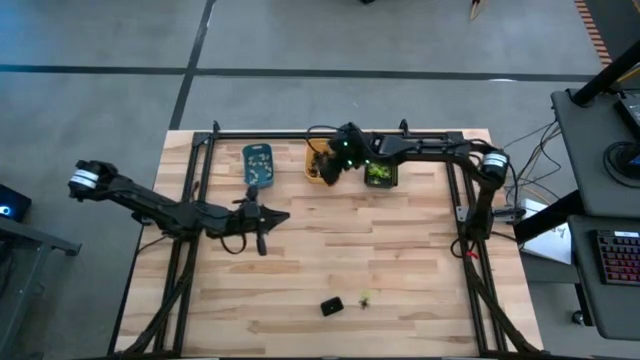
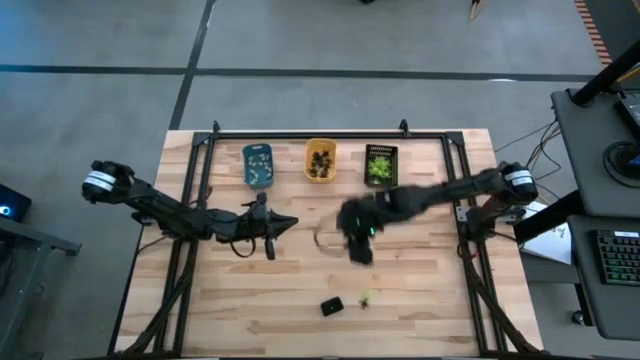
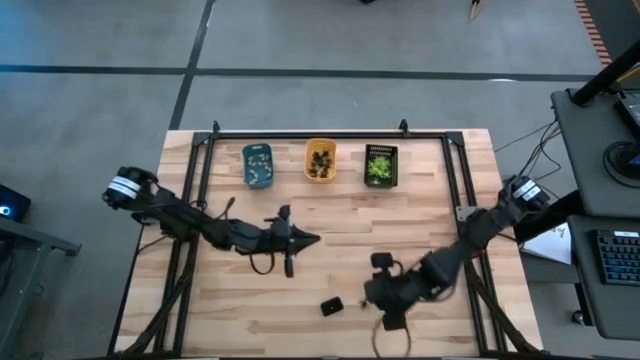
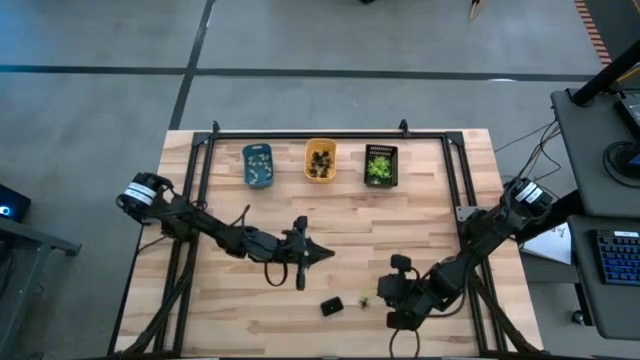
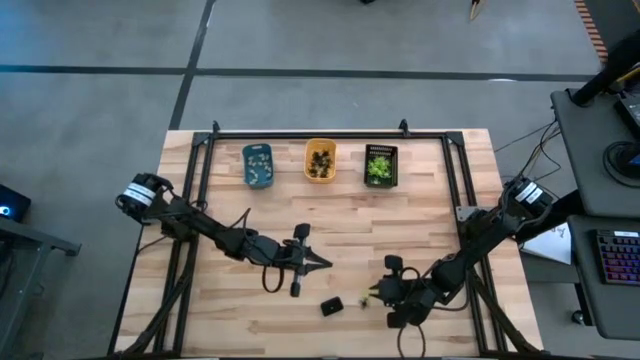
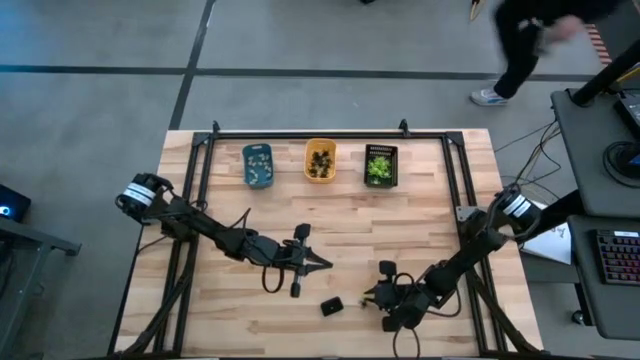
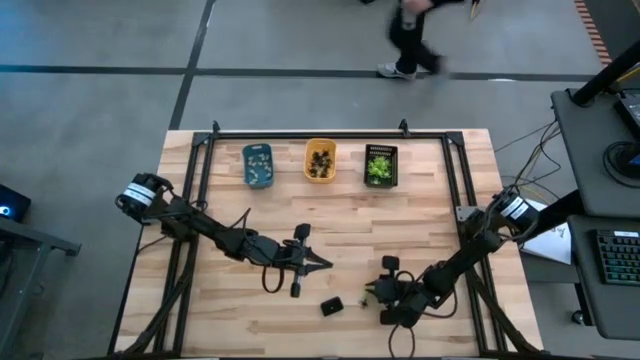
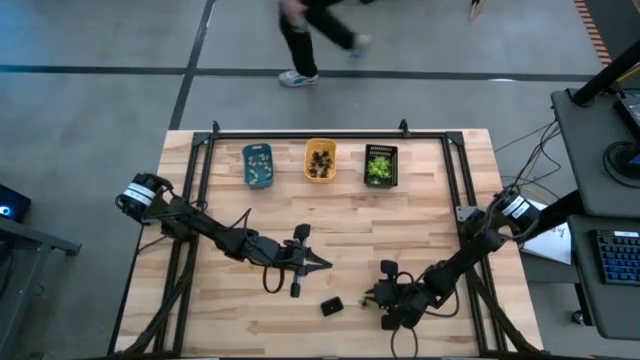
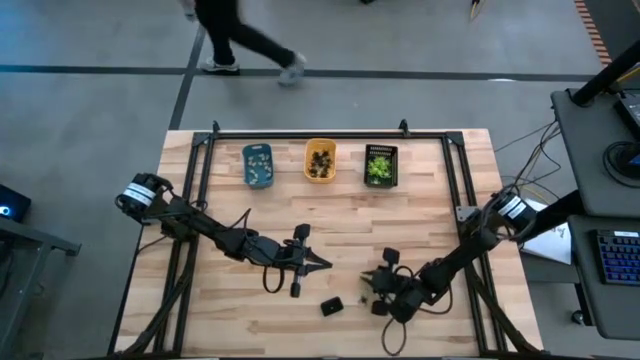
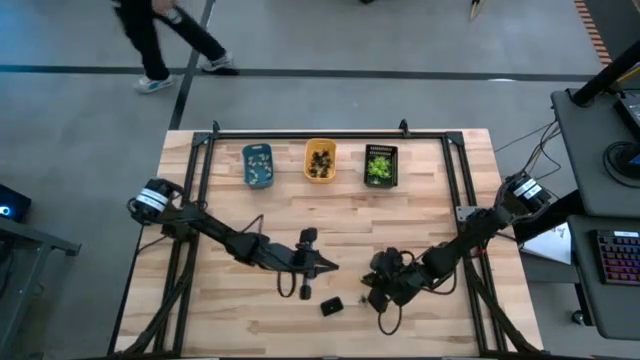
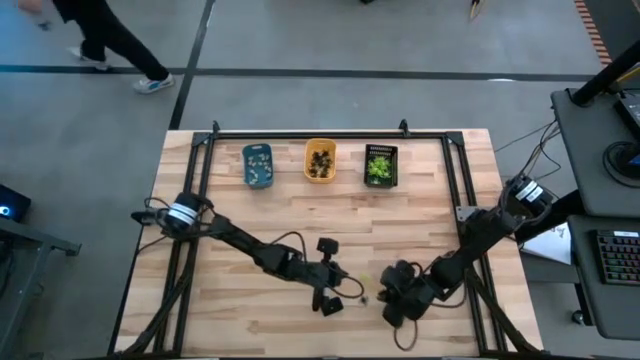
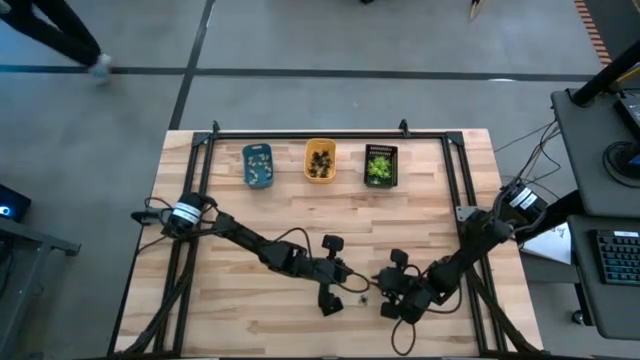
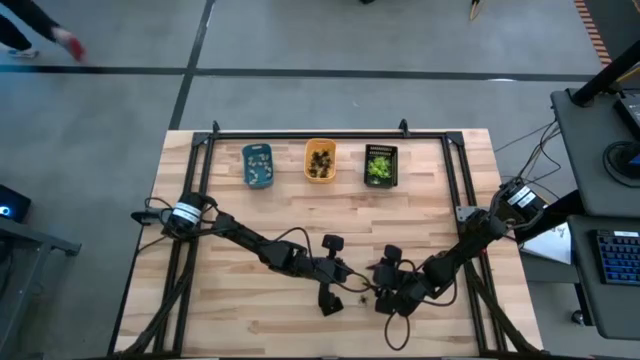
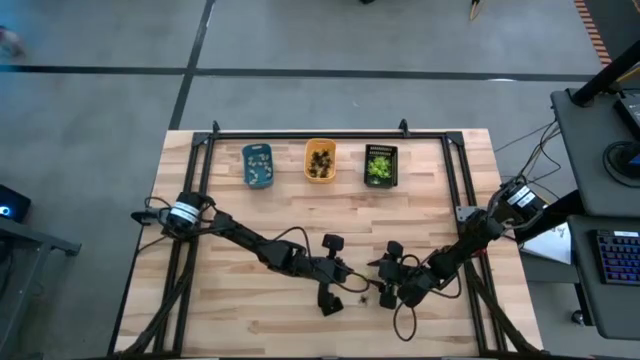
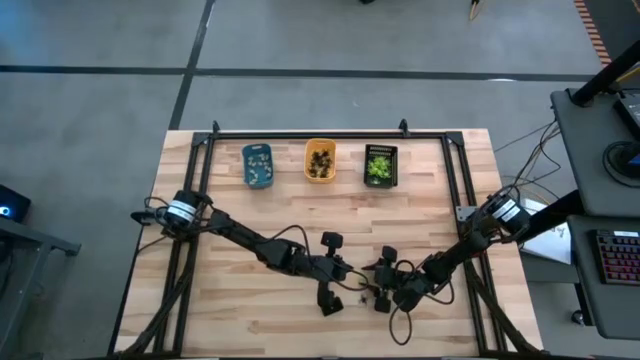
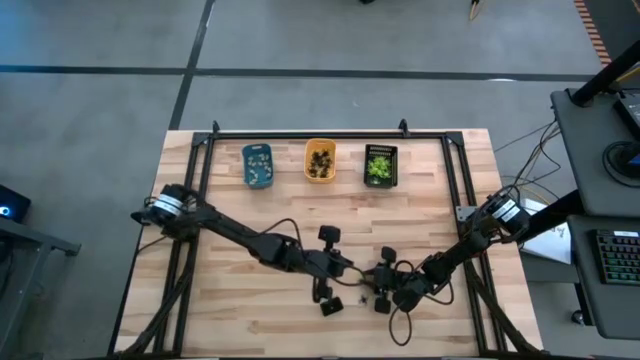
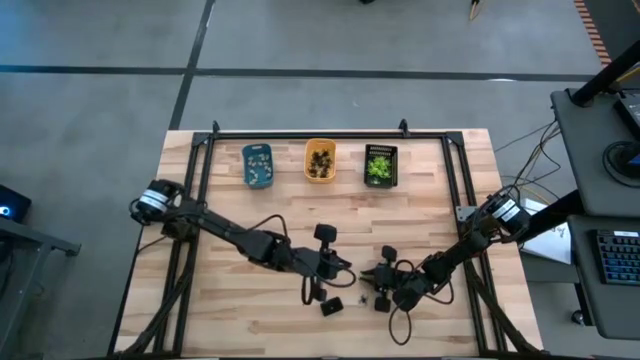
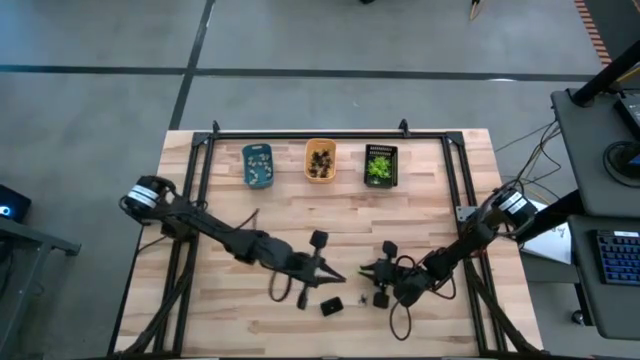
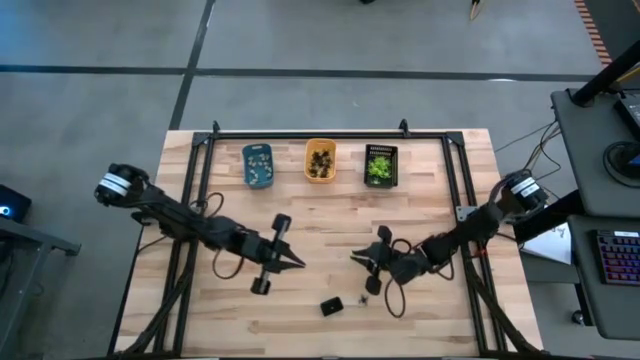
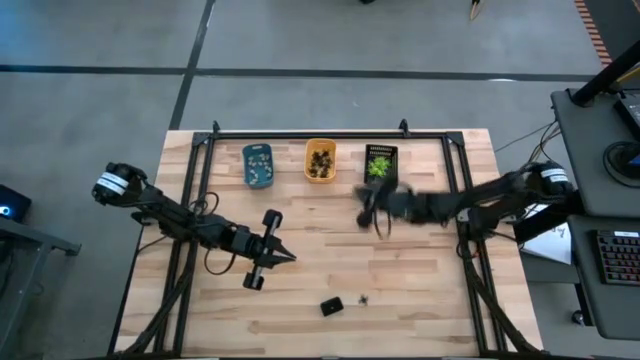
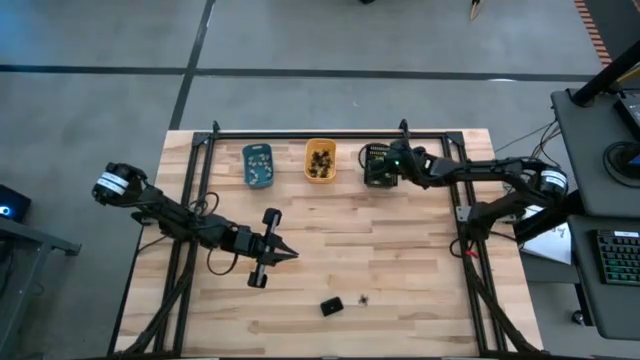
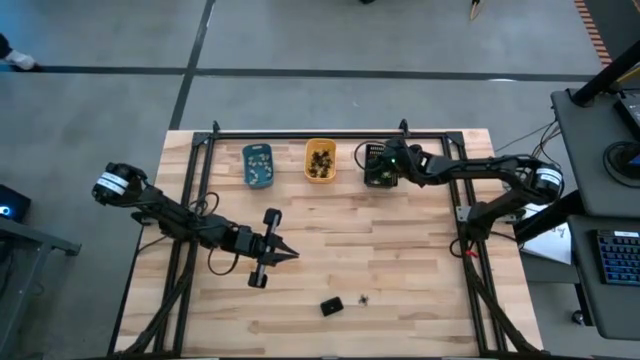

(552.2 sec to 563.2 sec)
Task: Sort Halloween decoration
Put the green spider toy into the black bin

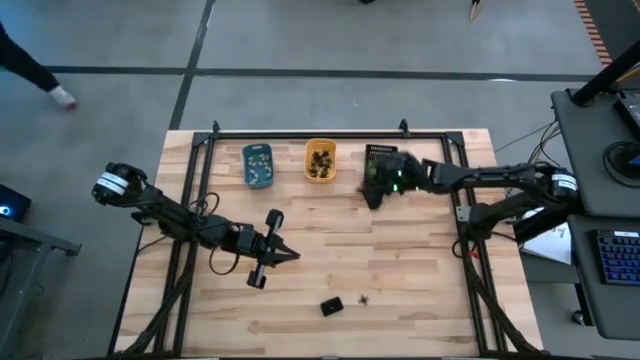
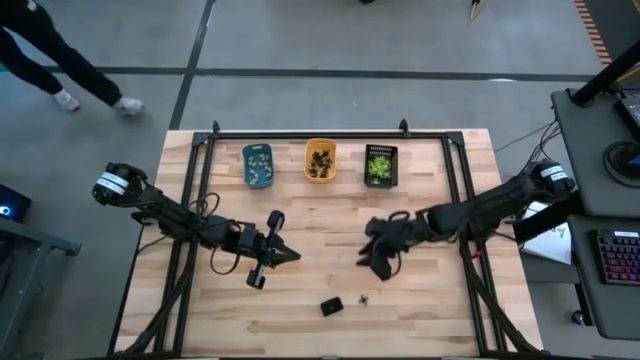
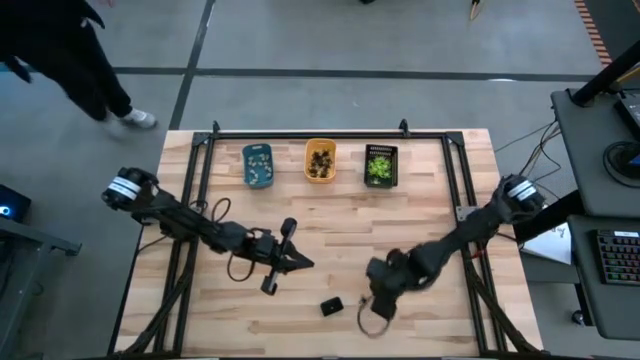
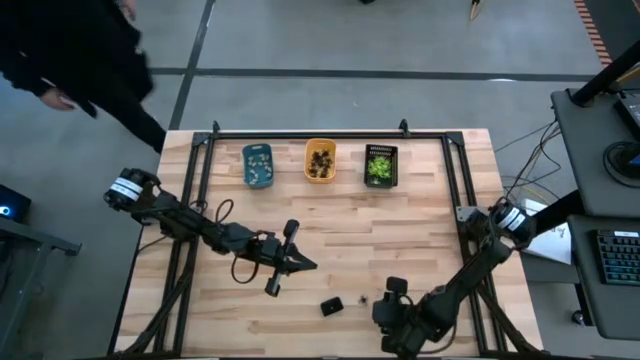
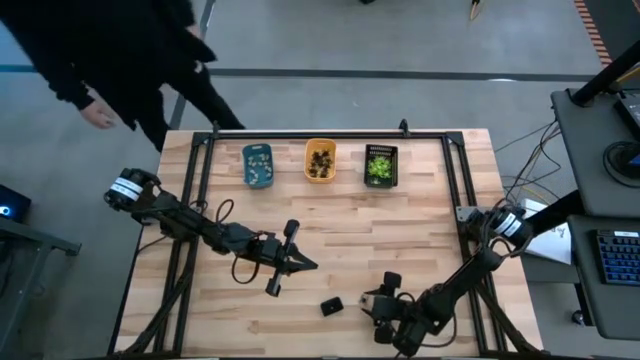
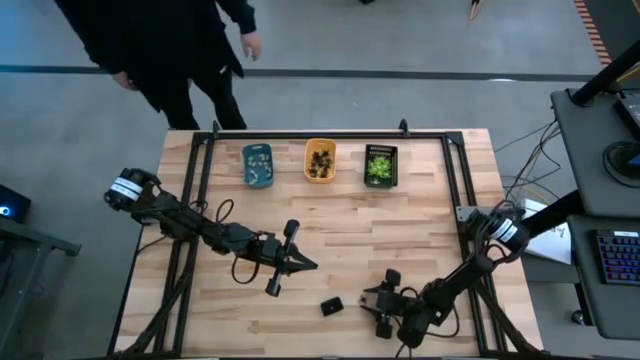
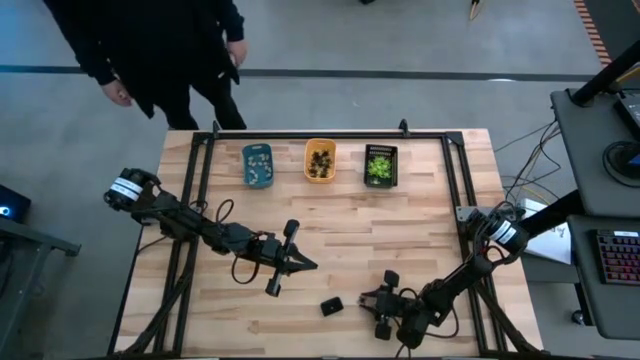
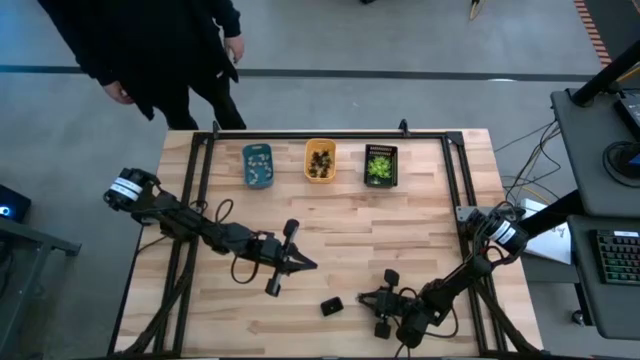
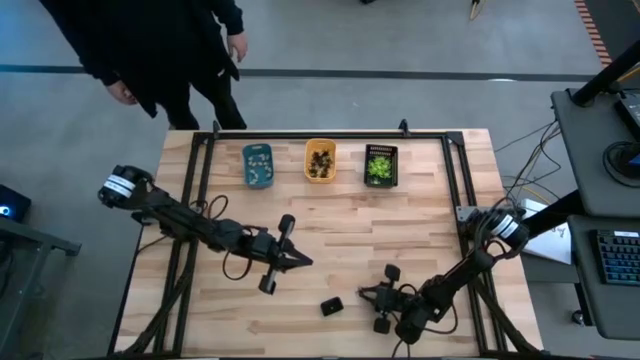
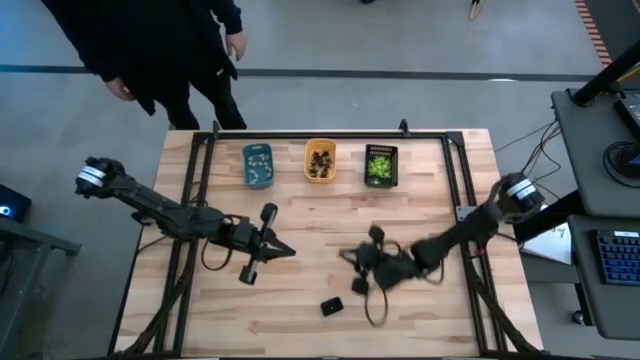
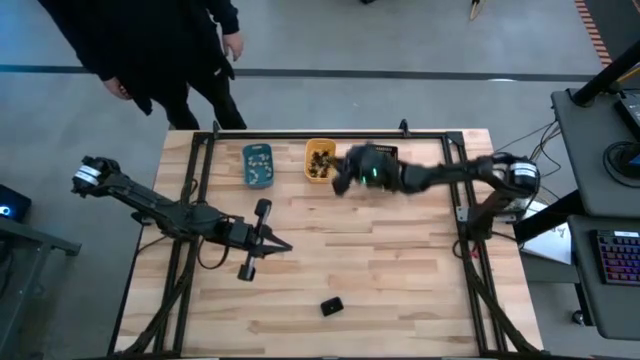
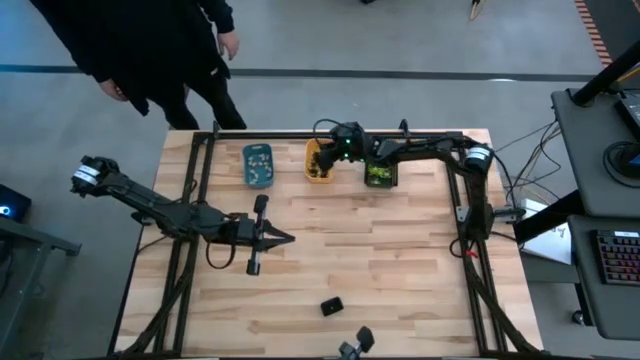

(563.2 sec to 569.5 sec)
Put the black spider toy into the orange bin

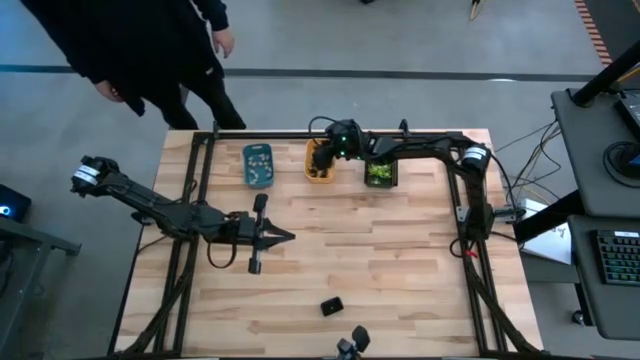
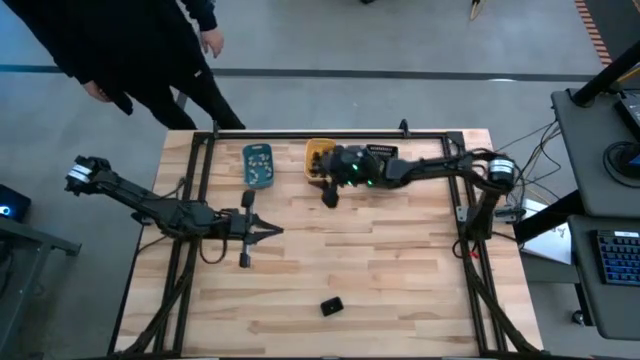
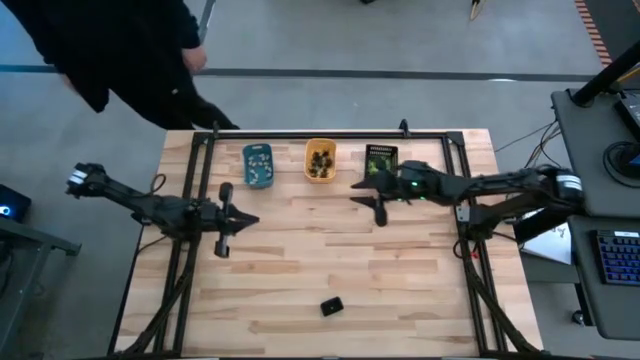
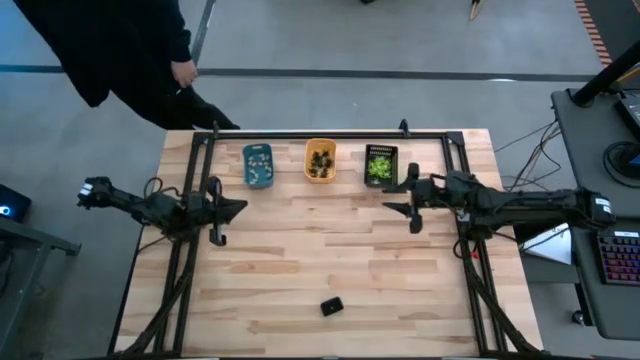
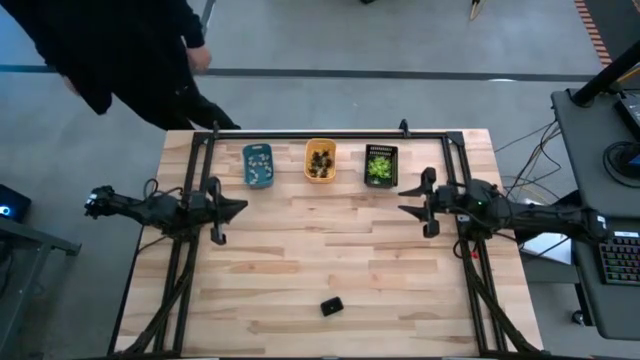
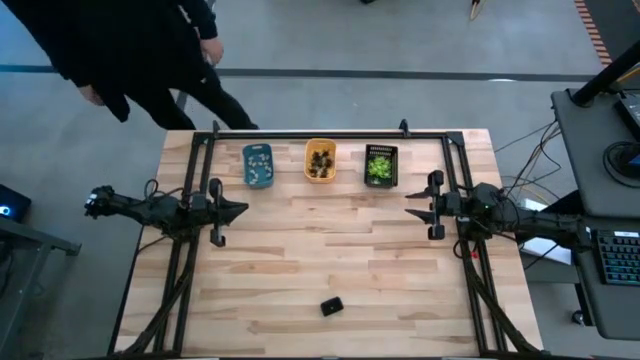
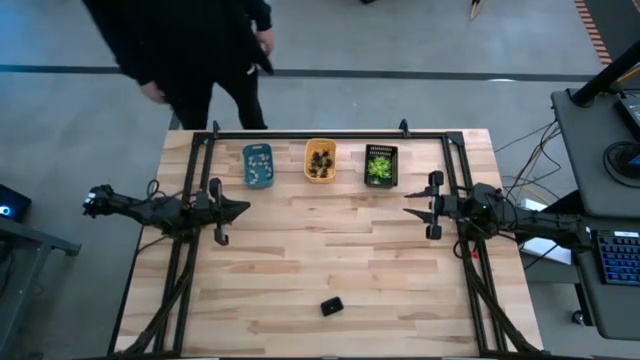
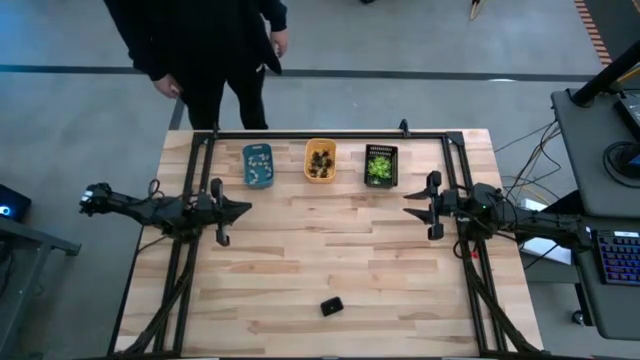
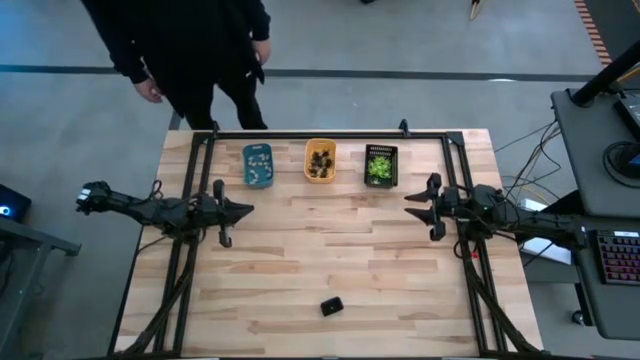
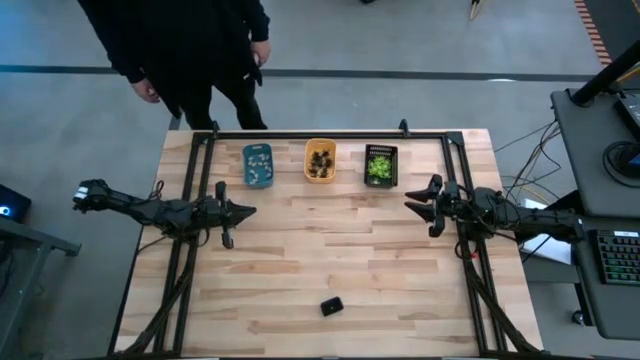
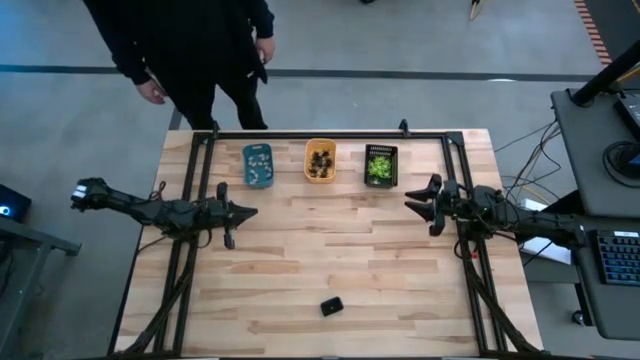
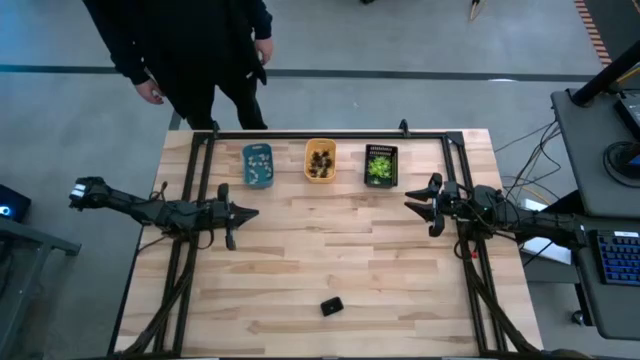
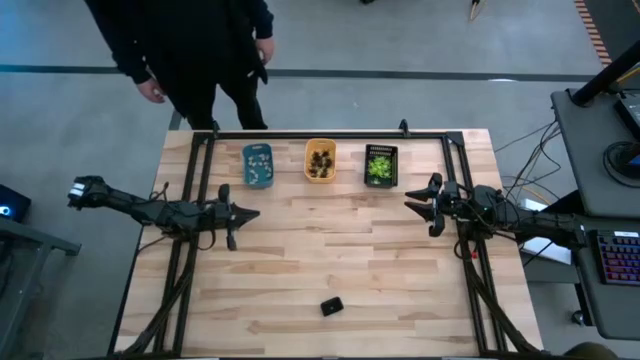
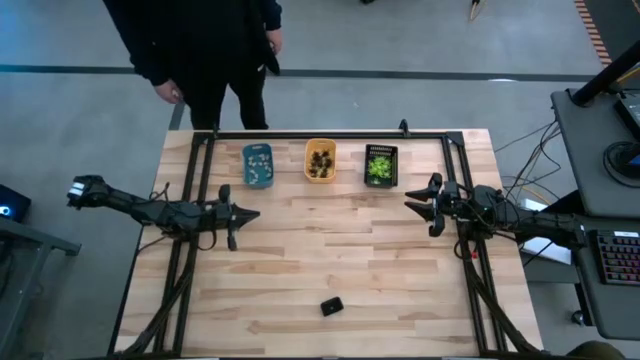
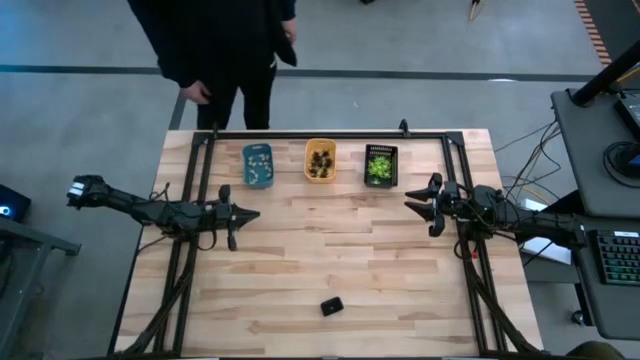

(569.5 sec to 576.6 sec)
Return to Home Position
